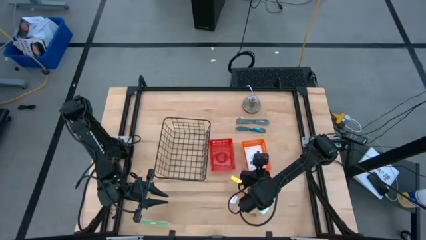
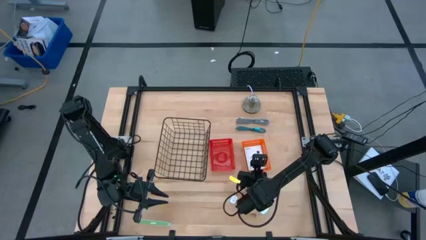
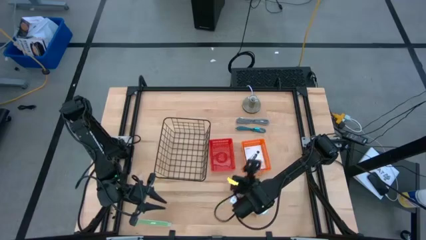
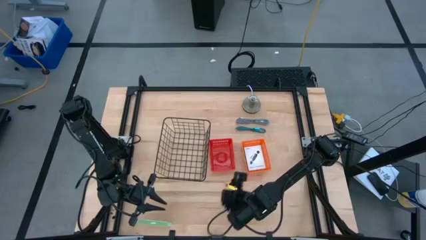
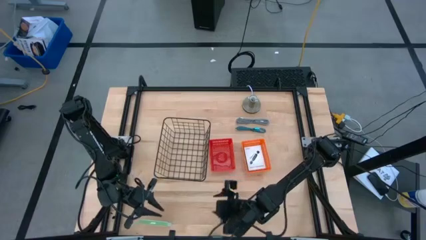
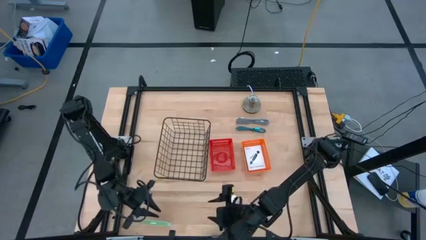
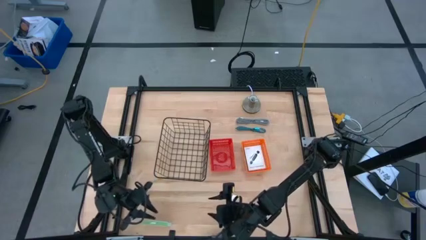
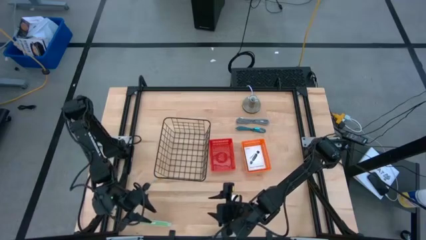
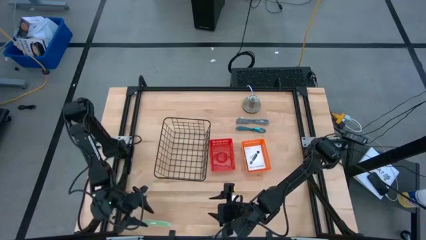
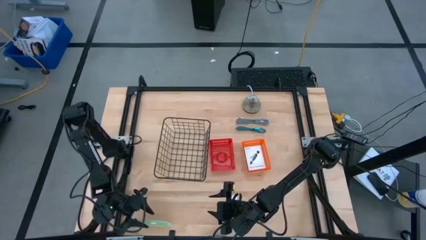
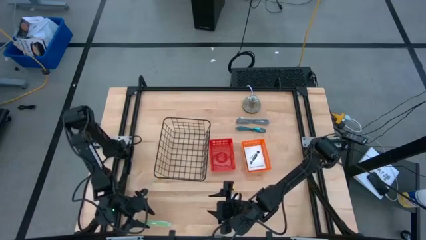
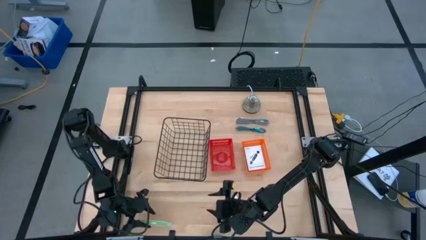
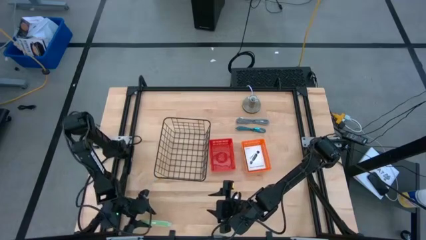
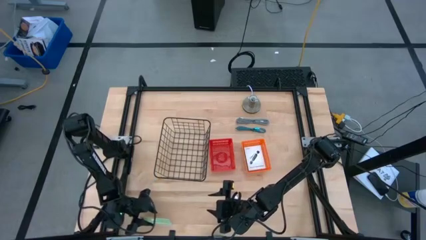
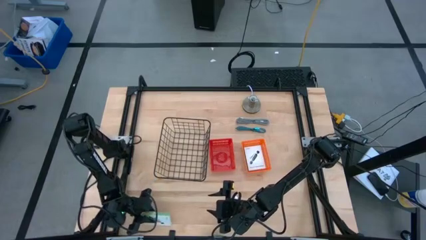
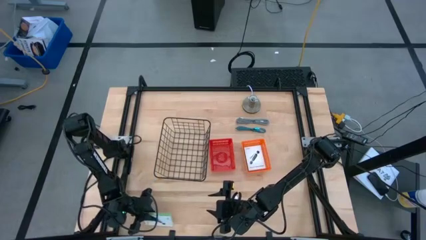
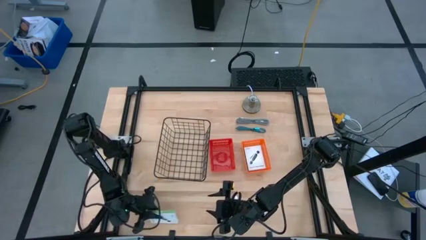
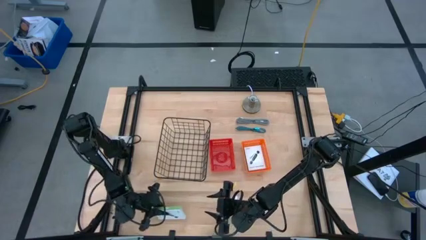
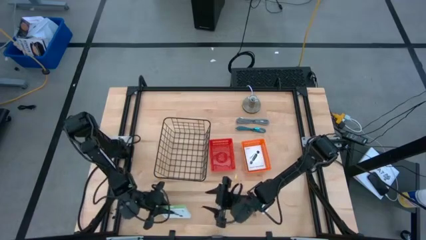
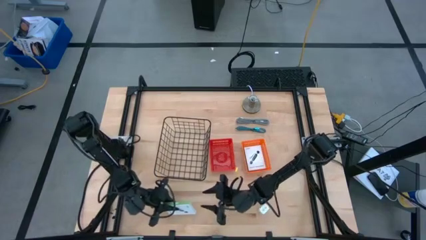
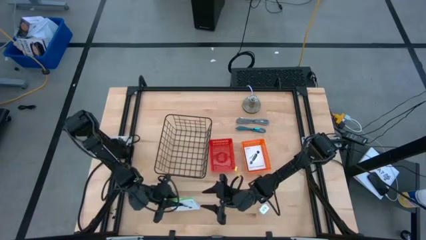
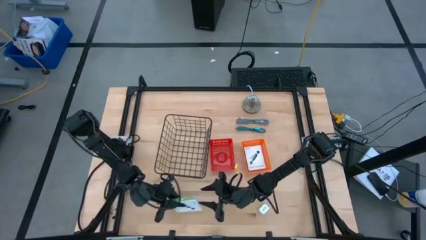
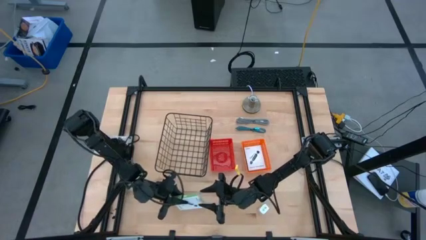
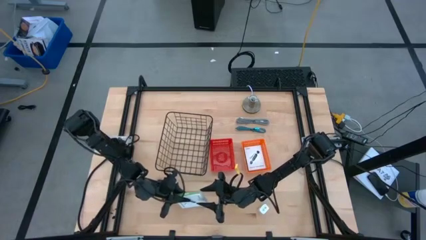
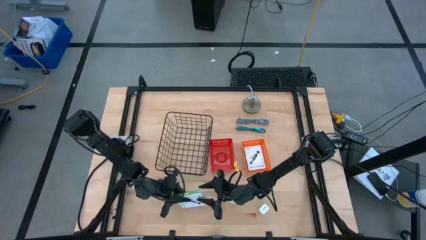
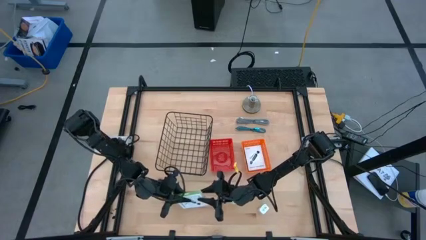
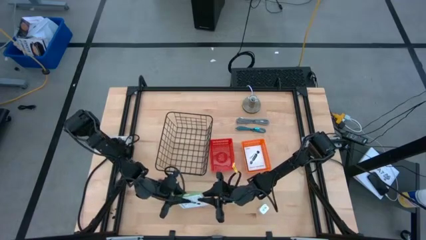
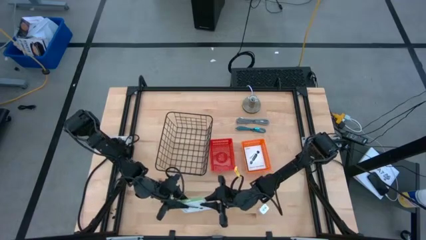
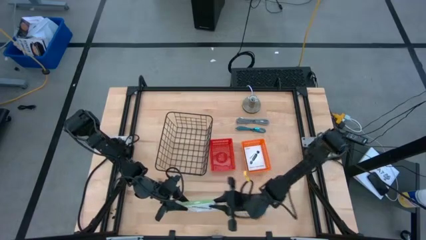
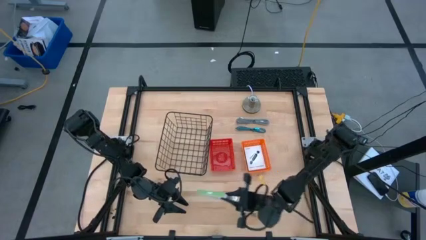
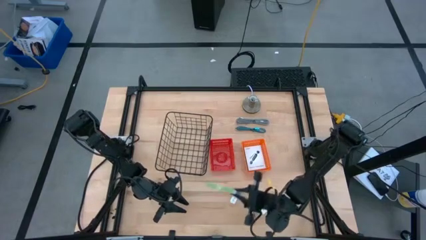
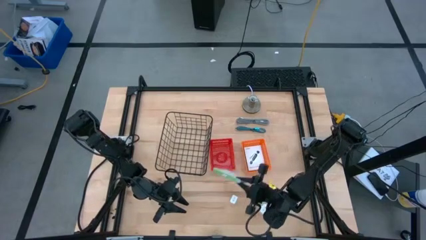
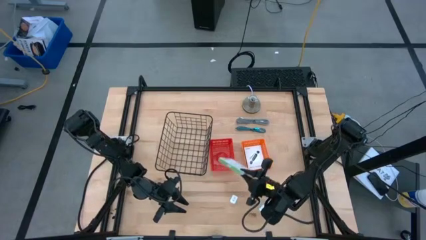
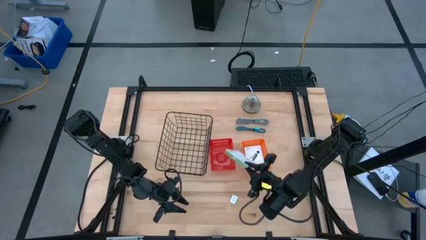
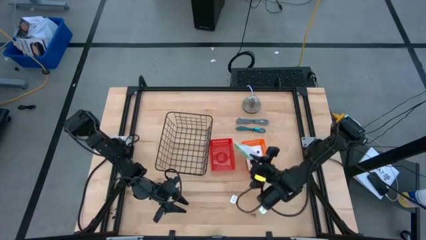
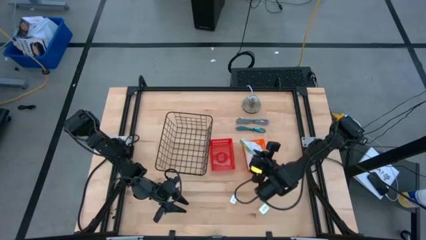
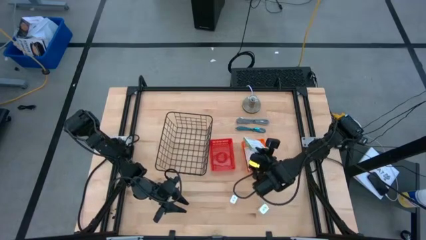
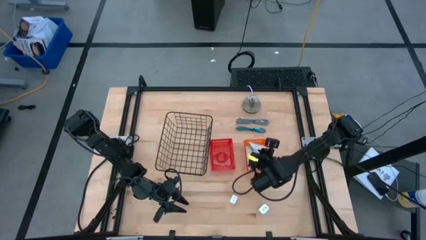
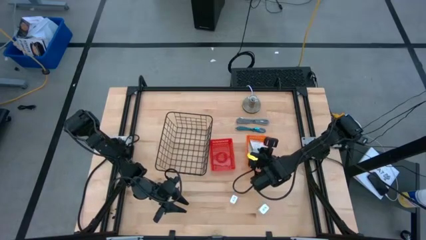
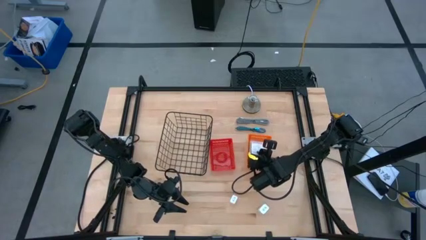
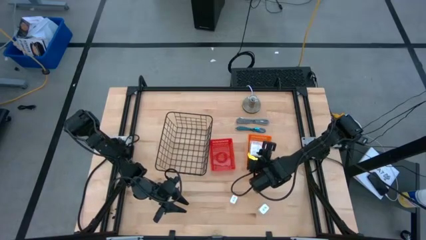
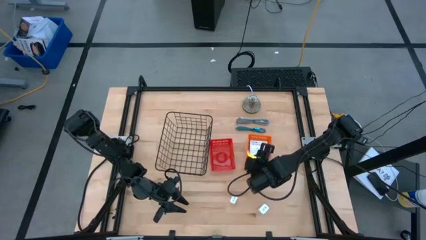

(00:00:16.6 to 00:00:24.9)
Task: Pick and place items into bin
Put the card reader box into the orange basket

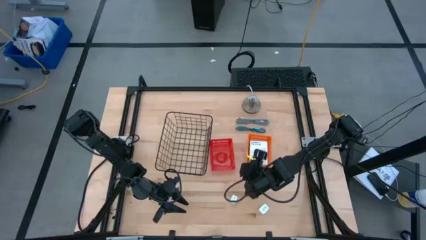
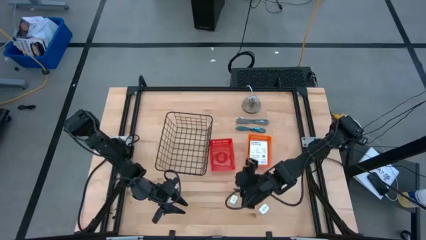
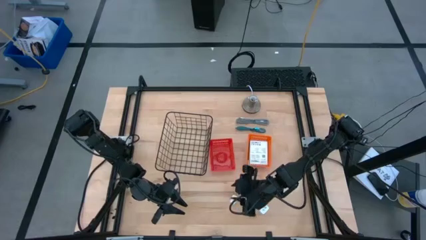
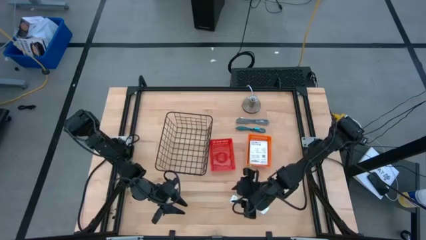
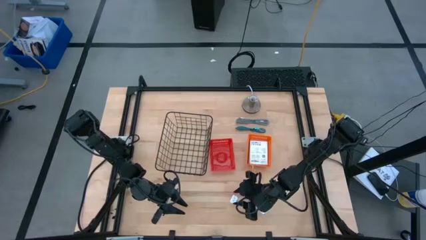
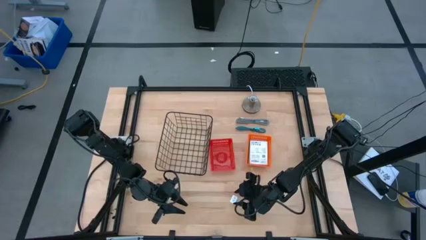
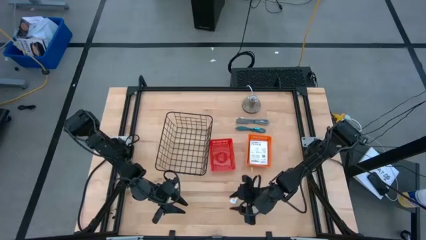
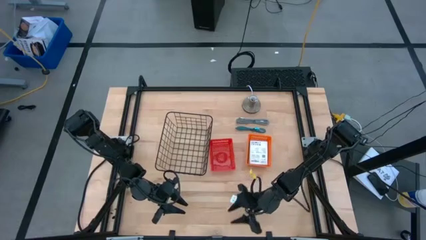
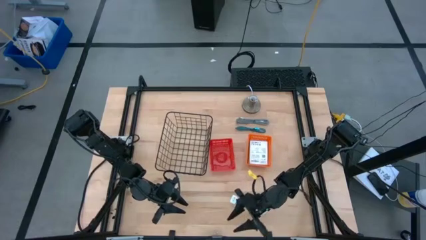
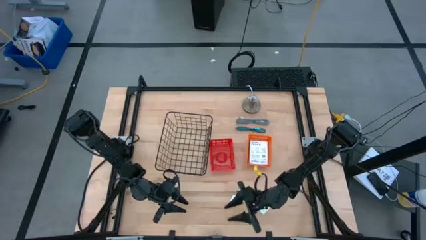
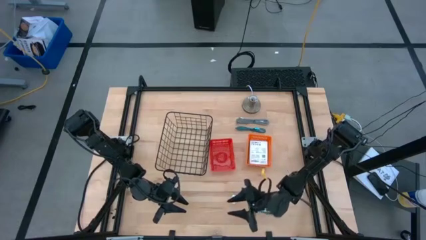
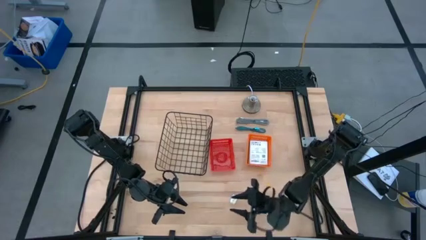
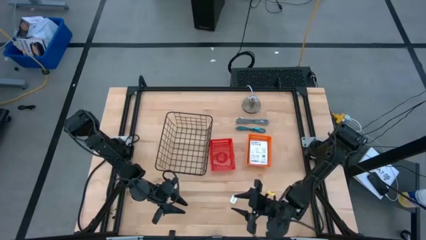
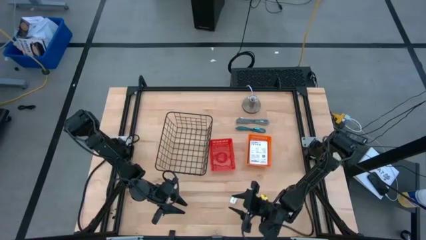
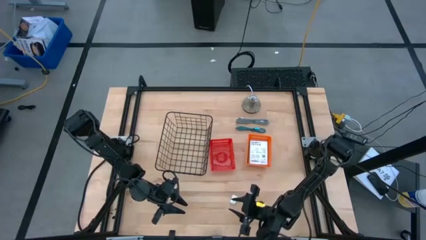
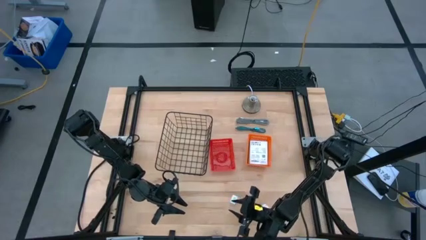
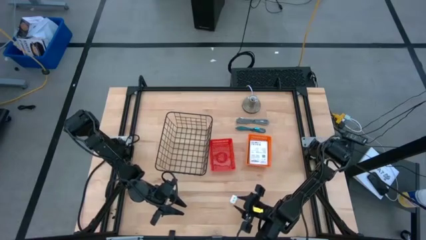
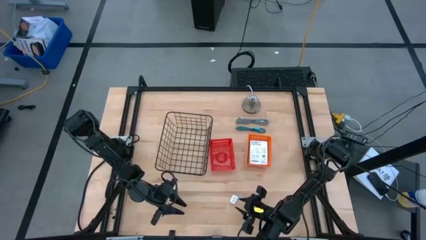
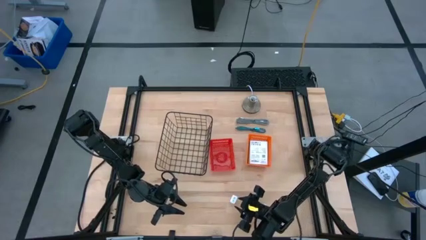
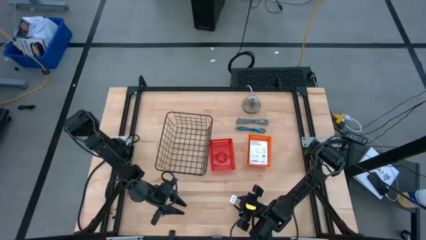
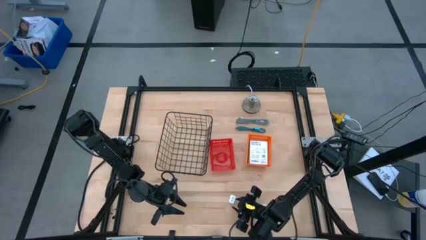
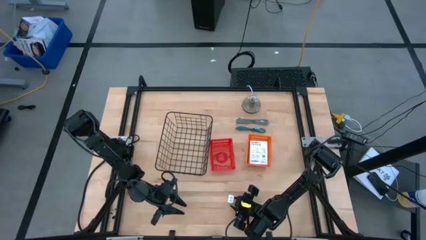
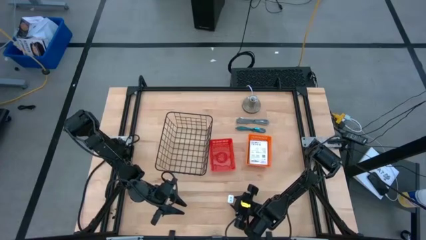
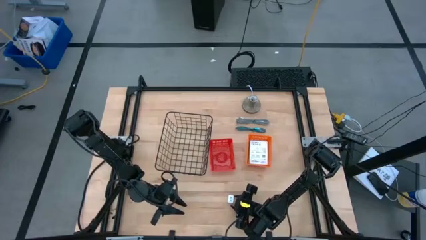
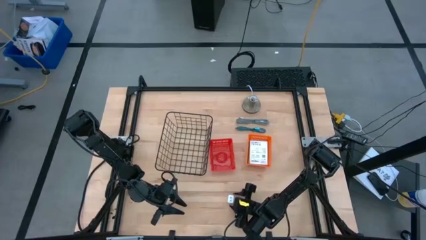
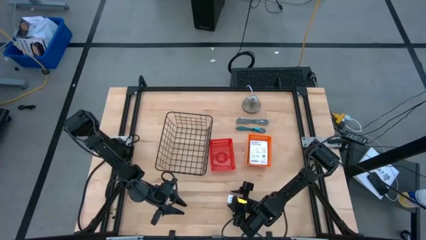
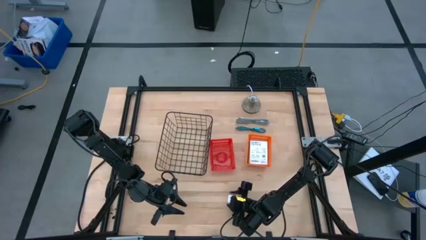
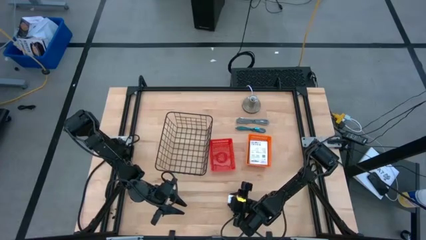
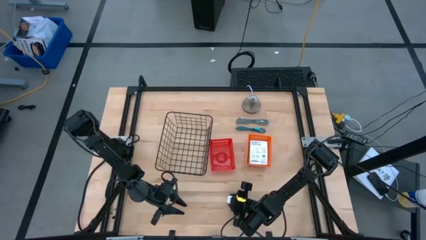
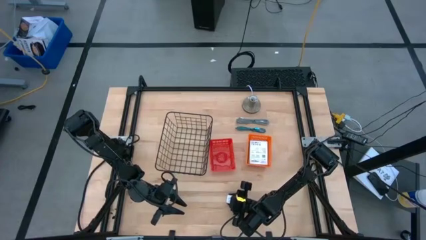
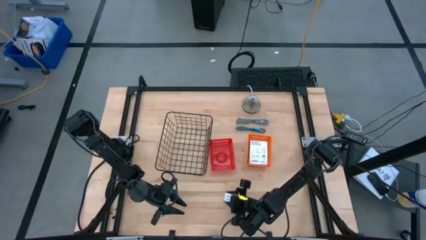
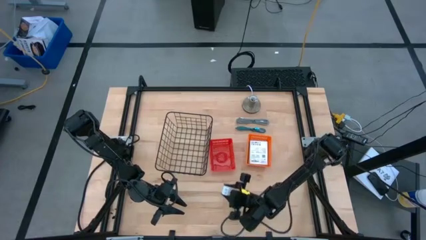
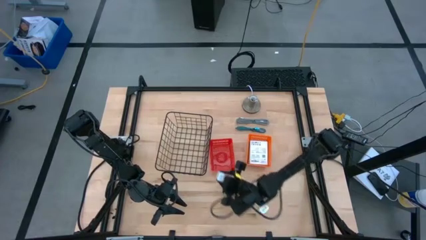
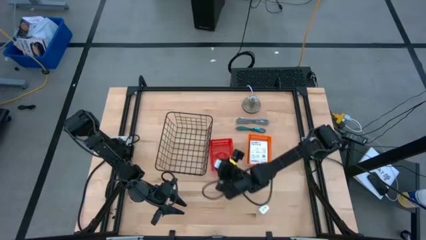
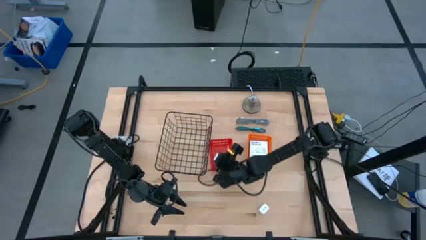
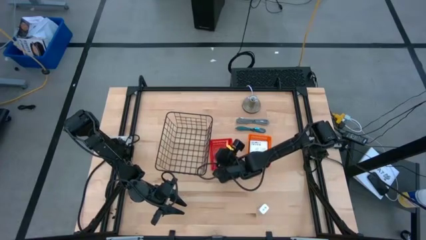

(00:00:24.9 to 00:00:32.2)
Put the left white charger adapter into the red basket
